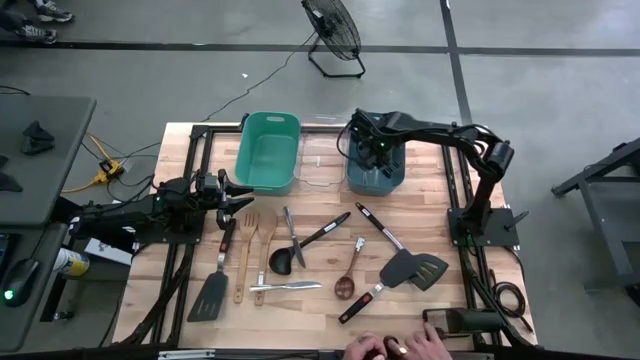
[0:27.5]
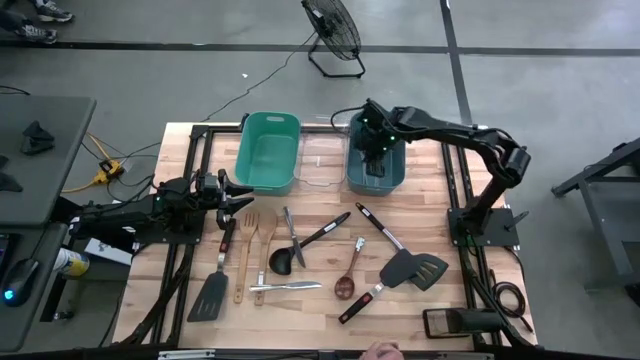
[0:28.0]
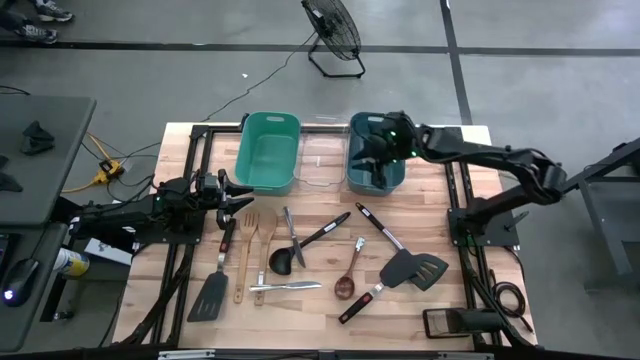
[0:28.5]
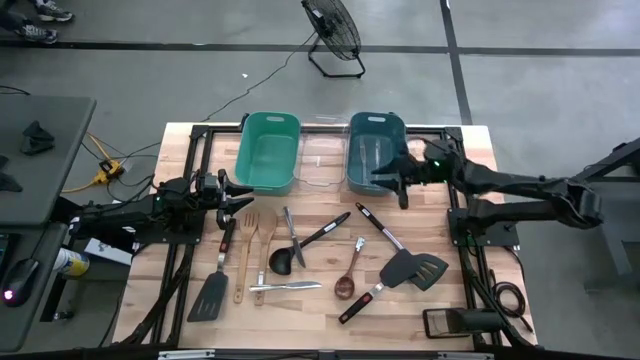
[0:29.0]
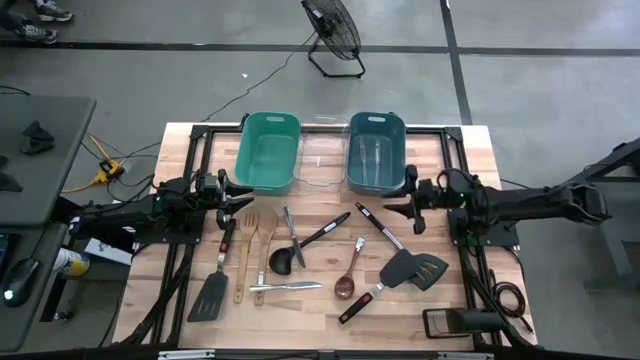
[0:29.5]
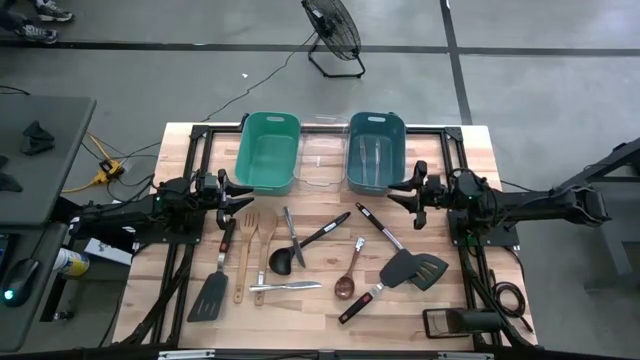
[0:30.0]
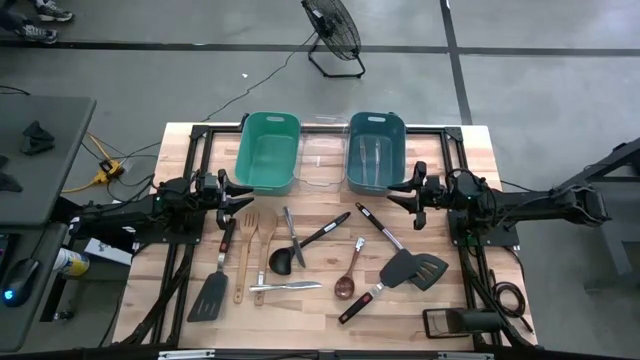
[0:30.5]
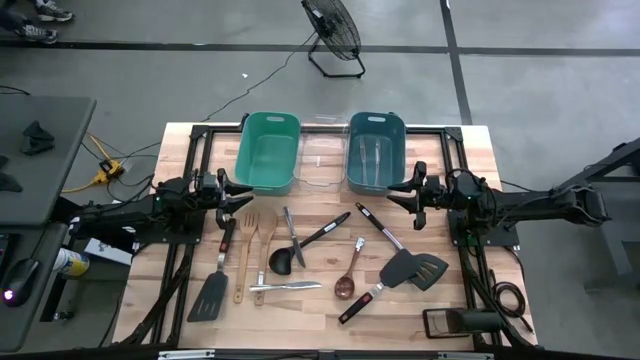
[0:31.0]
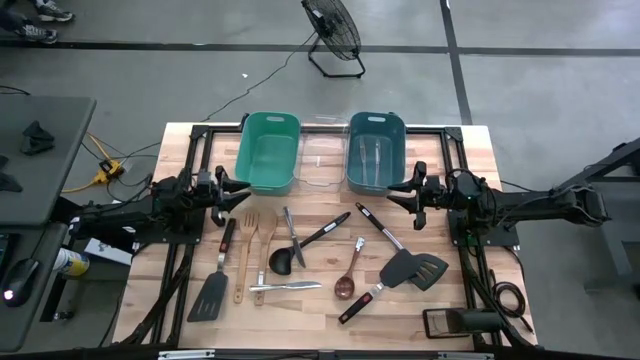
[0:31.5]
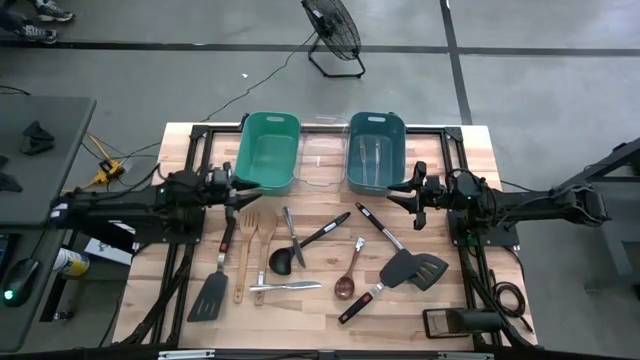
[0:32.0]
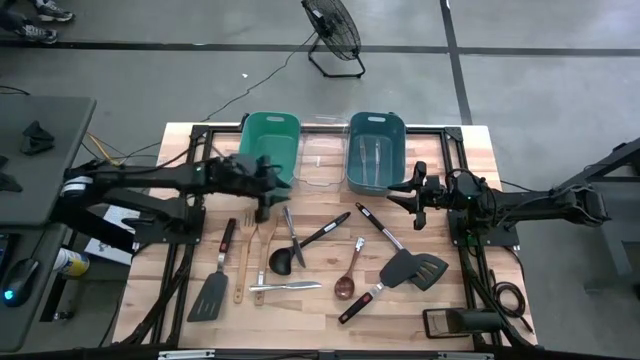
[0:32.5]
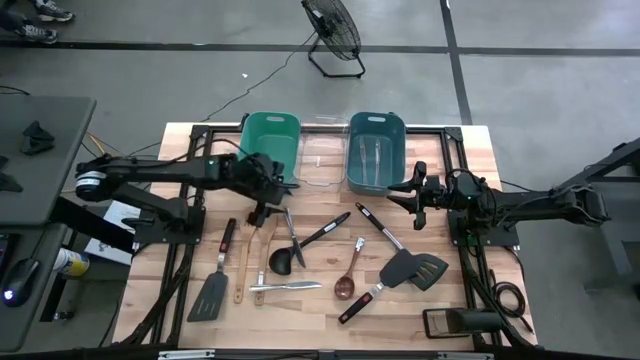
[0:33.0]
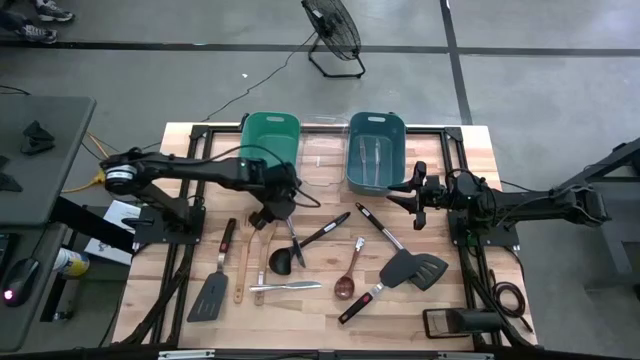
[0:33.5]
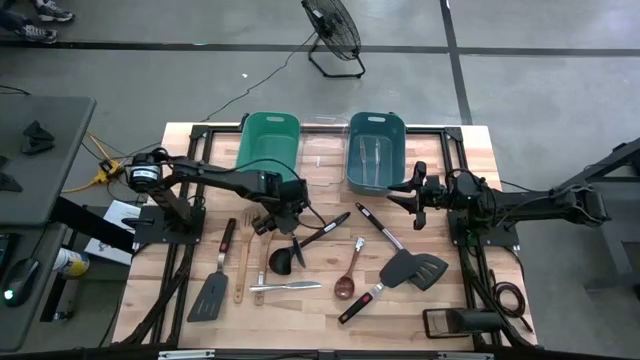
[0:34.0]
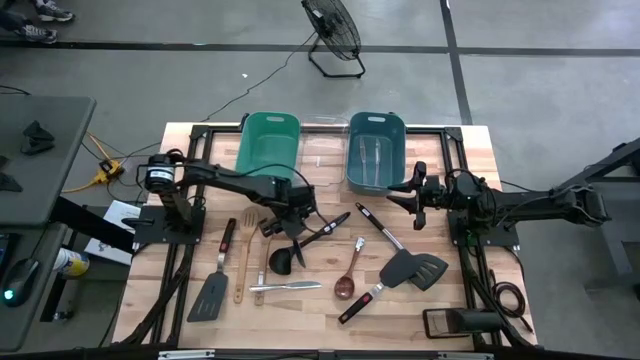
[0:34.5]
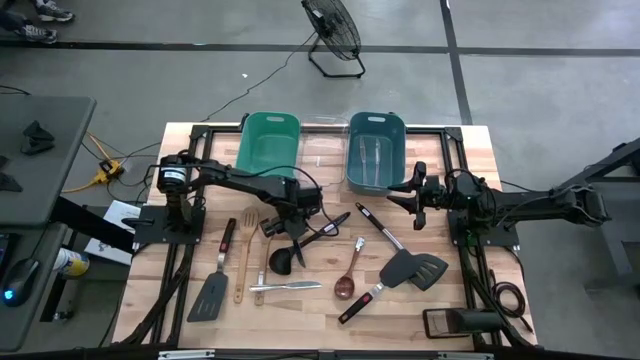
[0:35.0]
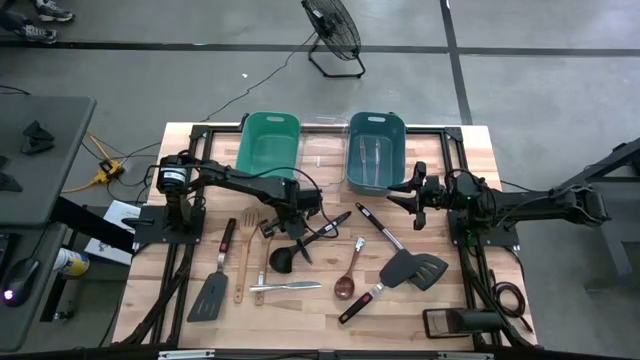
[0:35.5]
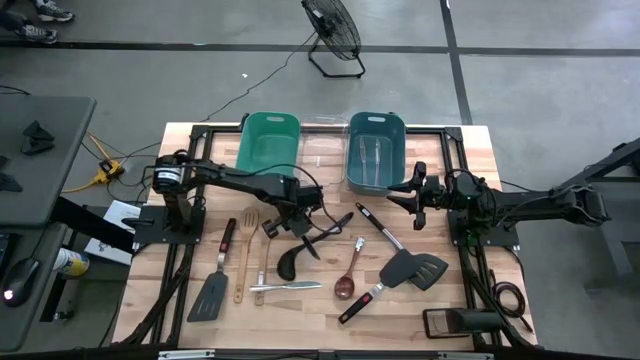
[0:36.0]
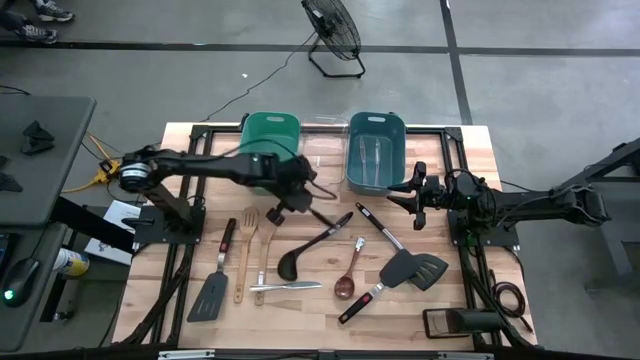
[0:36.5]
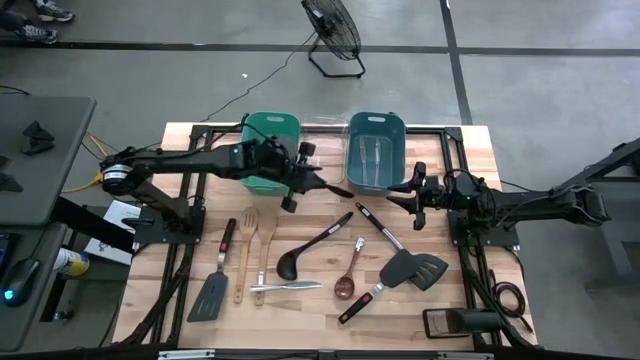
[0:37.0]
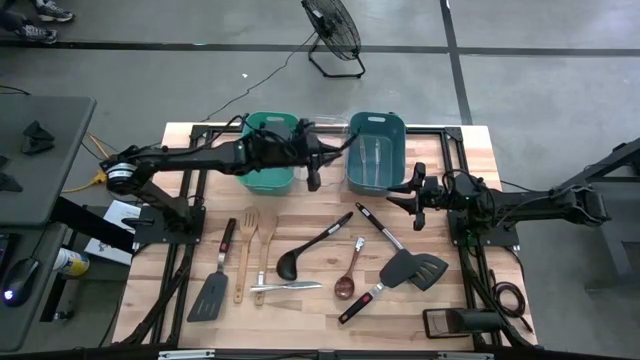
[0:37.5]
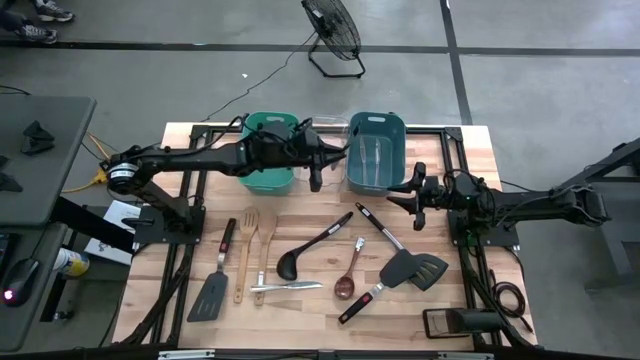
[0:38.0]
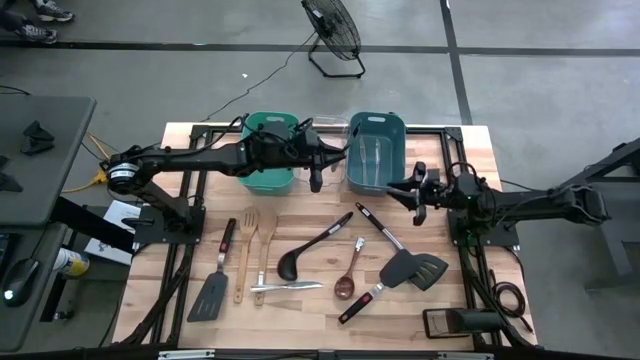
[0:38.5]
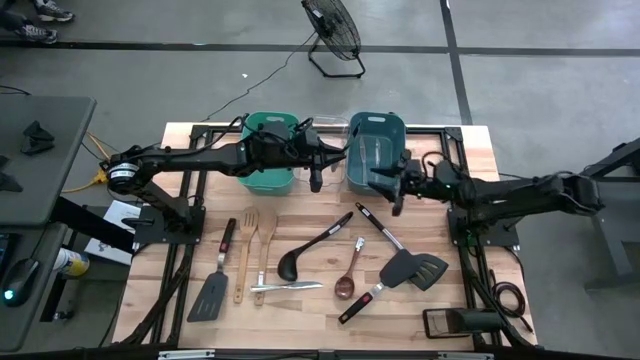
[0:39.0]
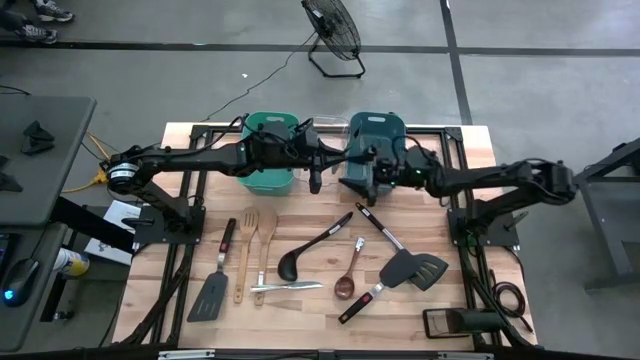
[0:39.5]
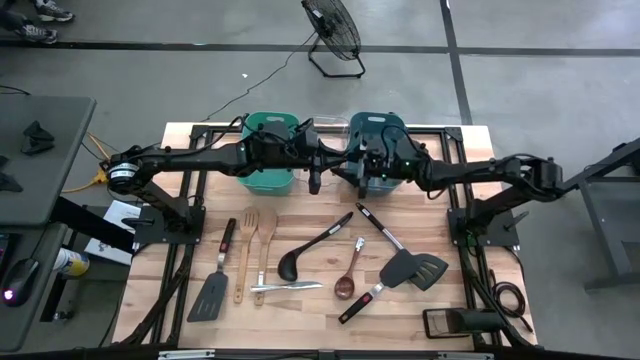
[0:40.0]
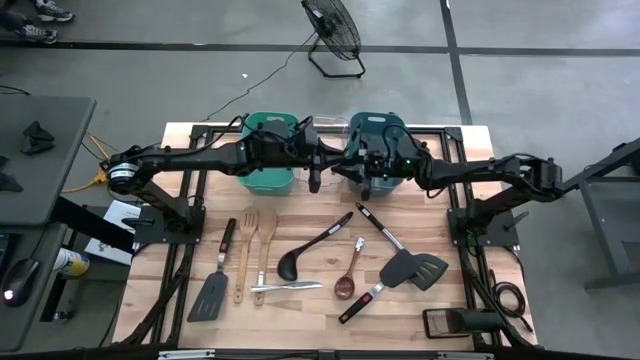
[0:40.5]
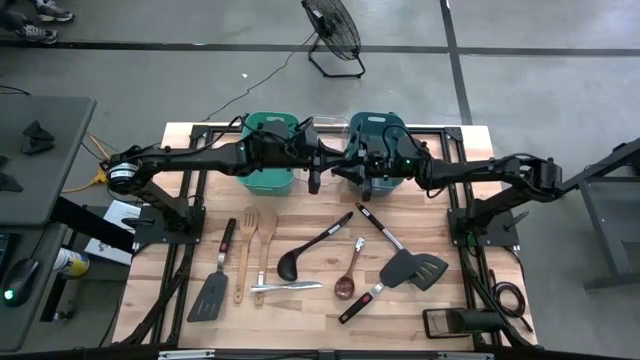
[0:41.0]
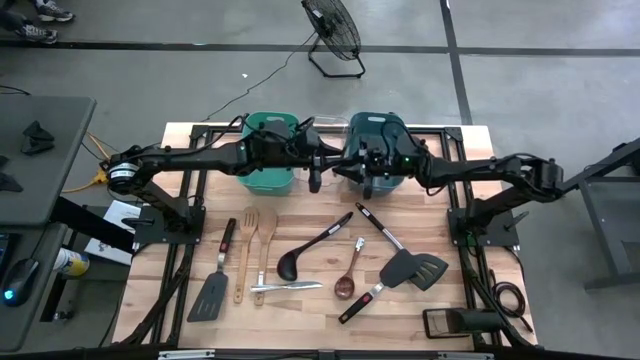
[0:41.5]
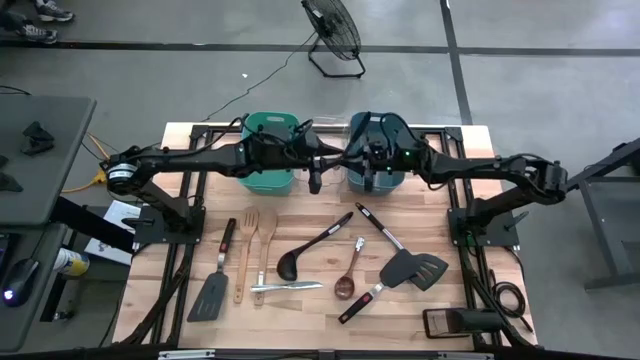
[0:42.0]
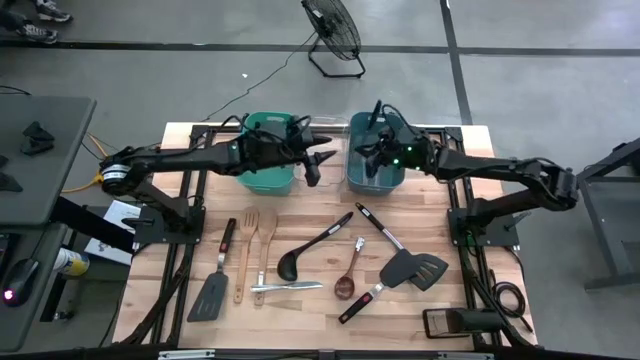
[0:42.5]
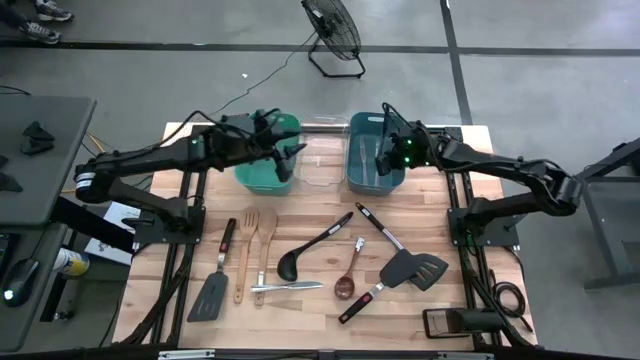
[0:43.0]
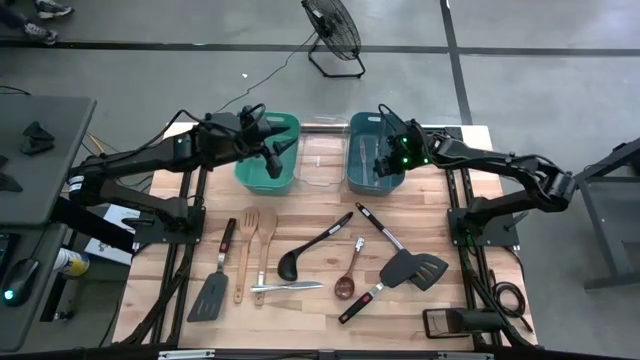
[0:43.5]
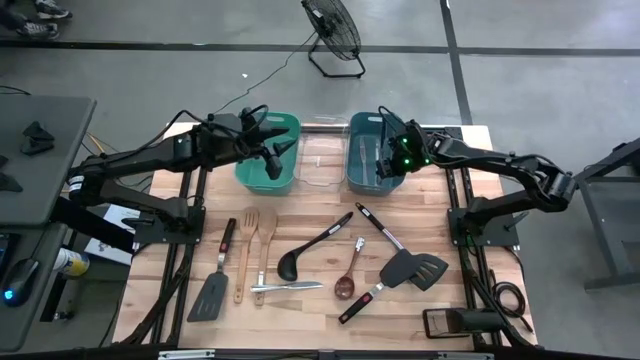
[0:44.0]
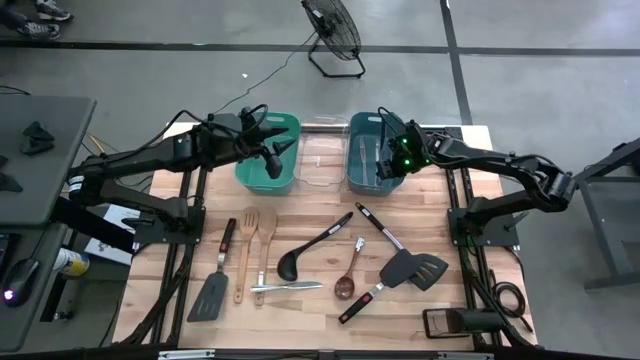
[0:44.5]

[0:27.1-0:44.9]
Task: Pick & Place Kitchen Items
Put the silver table knife into the blue bin
